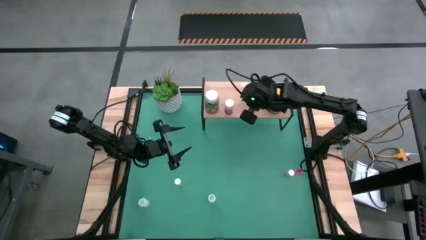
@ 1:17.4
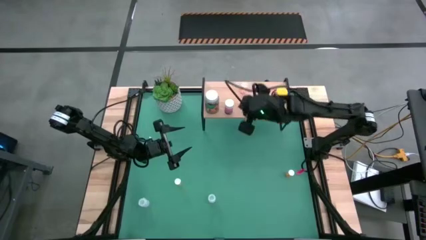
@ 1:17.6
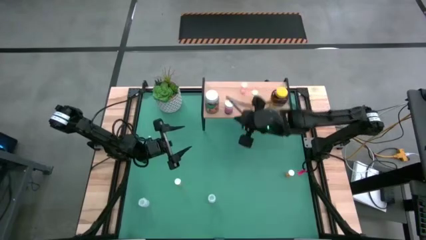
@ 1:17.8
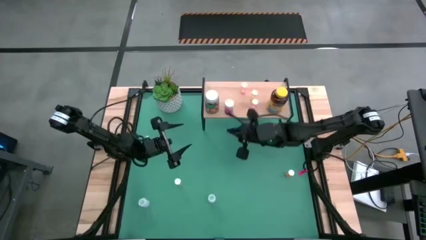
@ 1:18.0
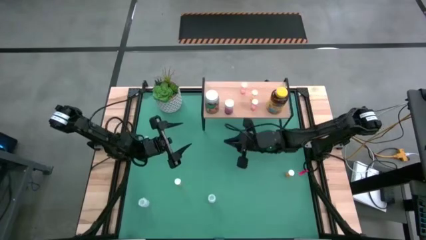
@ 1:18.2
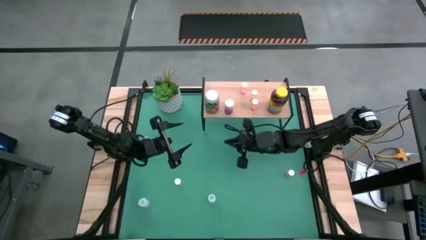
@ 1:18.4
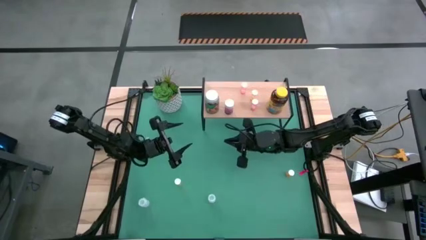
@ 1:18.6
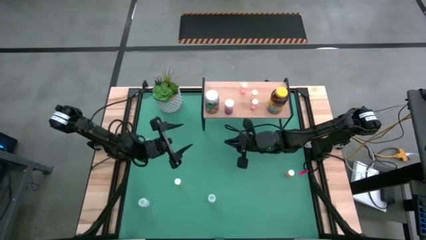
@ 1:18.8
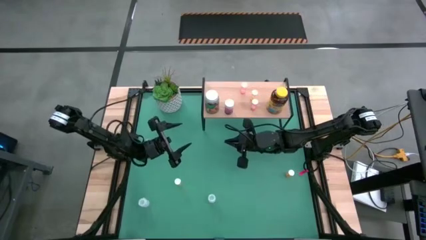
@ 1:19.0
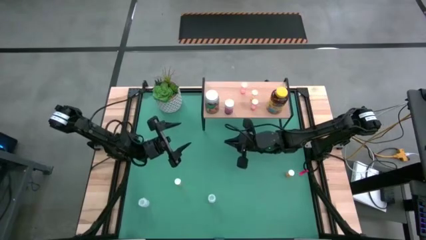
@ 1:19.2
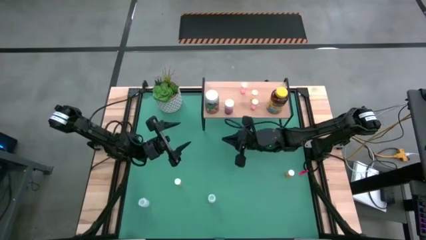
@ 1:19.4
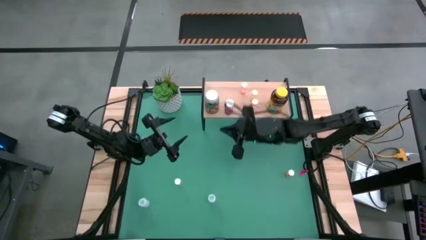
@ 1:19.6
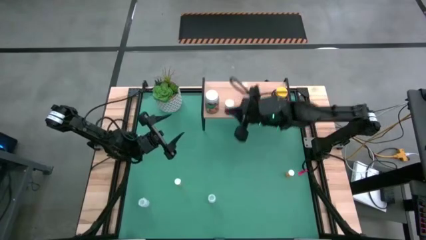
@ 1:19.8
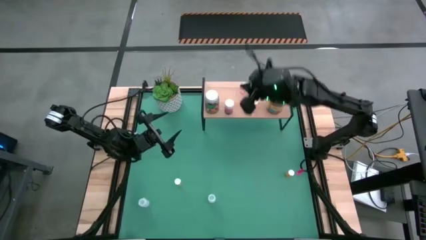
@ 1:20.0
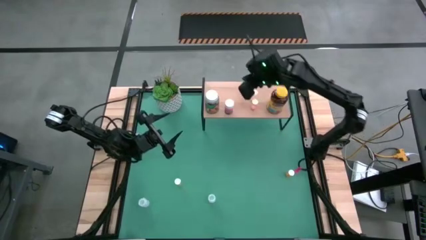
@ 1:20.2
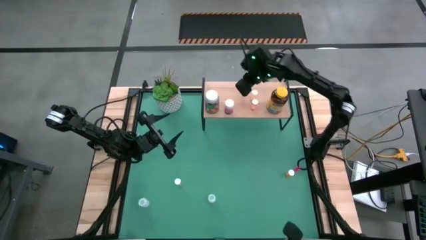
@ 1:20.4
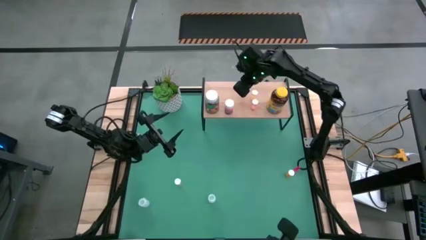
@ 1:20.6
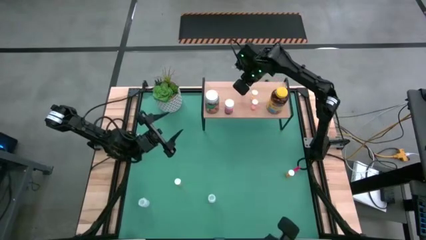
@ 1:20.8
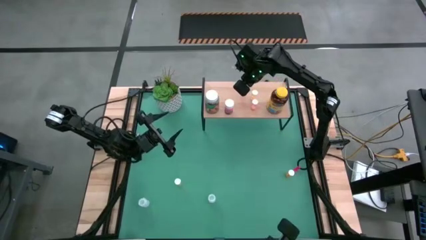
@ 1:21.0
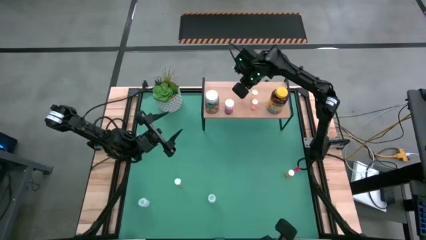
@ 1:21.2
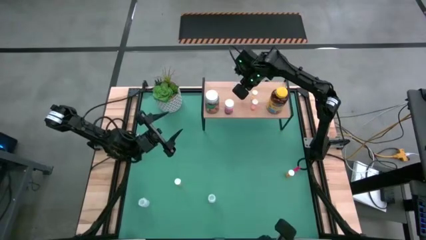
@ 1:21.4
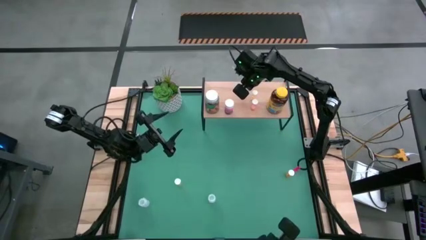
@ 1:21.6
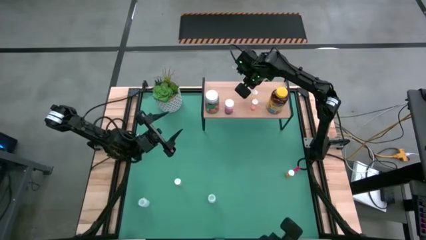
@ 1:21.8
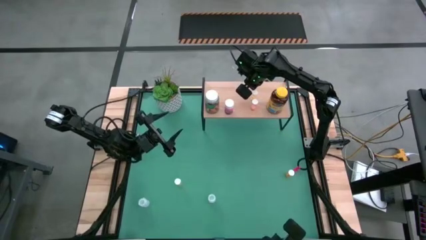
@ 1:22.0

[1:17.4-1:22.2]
Task: Pick and place medicine bottles onto shelf by color
Adjust the small pink medicine bottle on the shelf

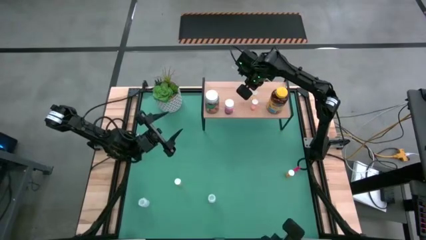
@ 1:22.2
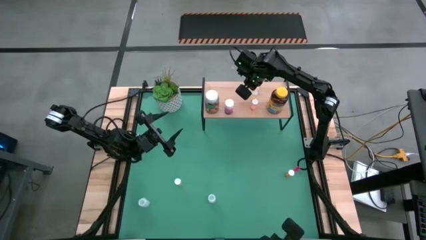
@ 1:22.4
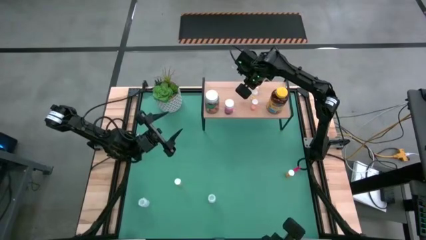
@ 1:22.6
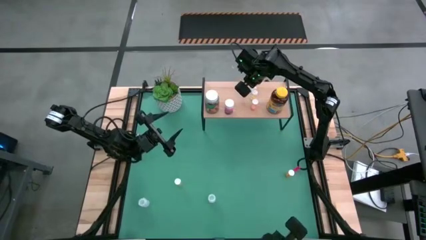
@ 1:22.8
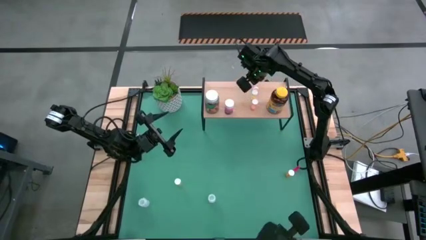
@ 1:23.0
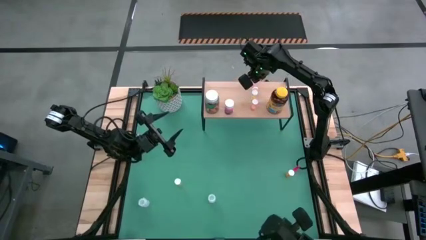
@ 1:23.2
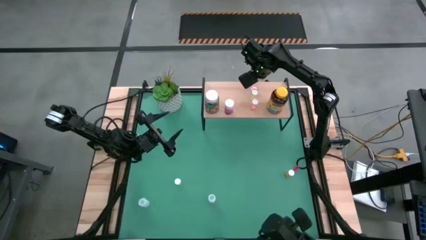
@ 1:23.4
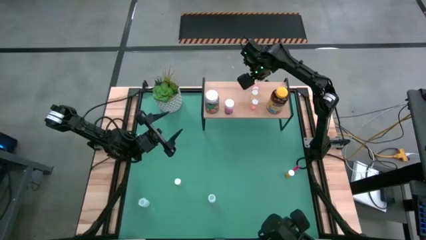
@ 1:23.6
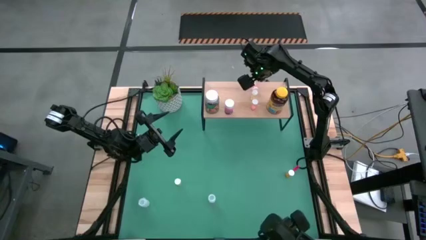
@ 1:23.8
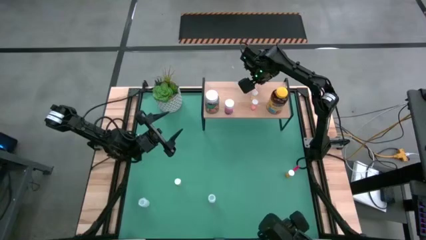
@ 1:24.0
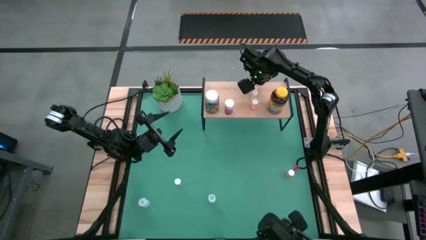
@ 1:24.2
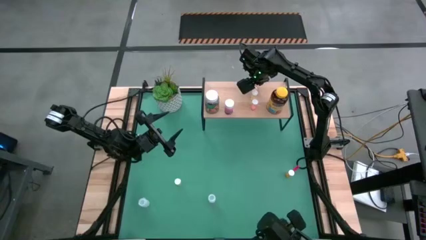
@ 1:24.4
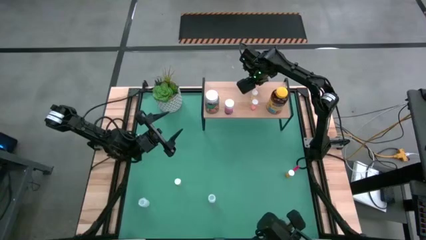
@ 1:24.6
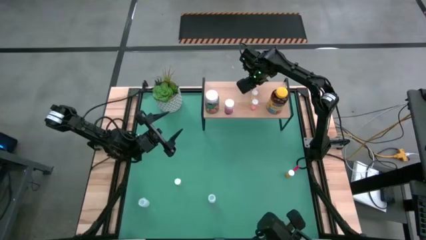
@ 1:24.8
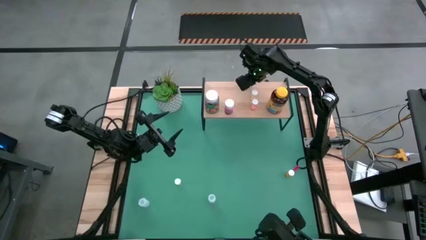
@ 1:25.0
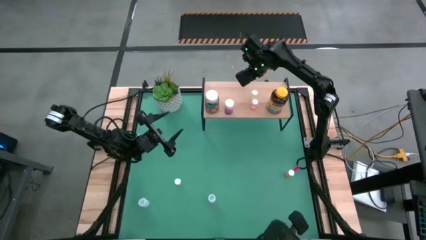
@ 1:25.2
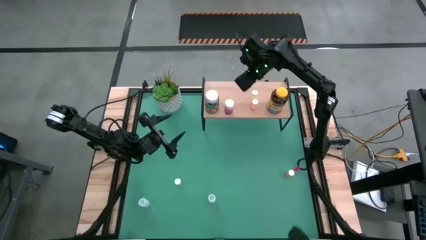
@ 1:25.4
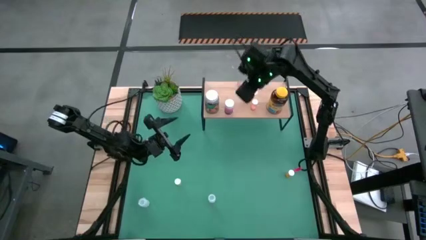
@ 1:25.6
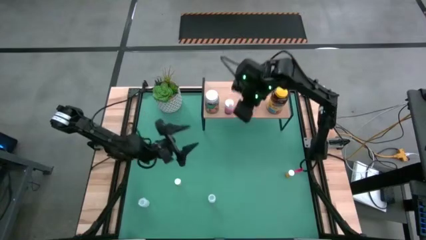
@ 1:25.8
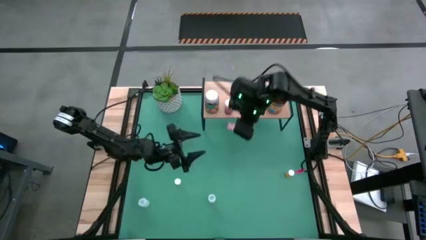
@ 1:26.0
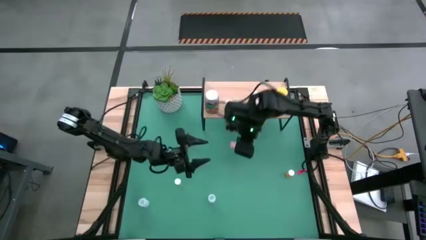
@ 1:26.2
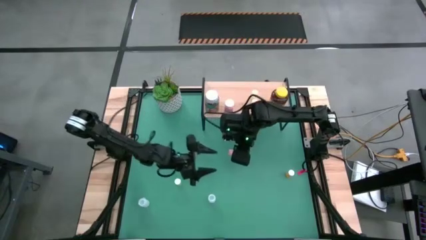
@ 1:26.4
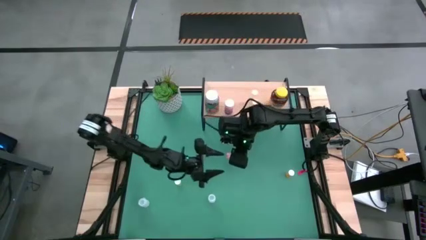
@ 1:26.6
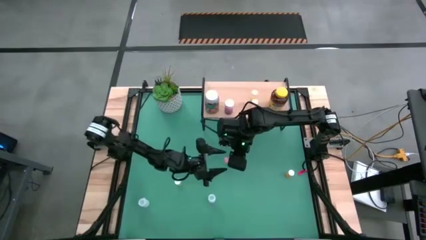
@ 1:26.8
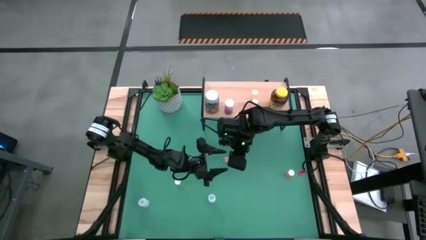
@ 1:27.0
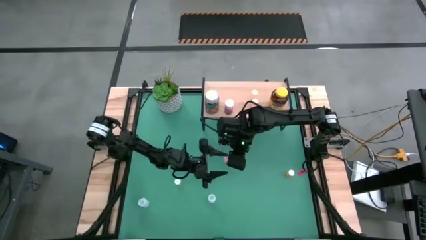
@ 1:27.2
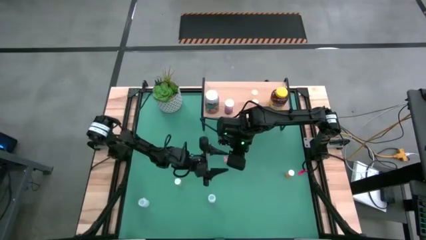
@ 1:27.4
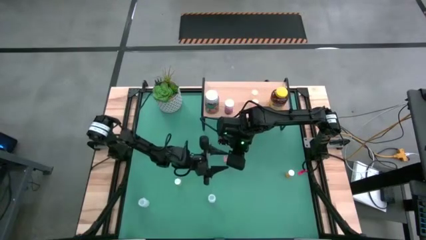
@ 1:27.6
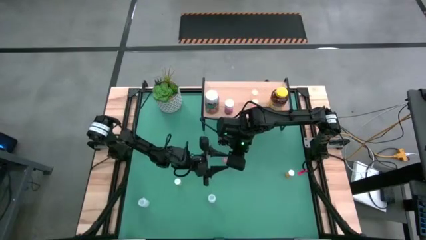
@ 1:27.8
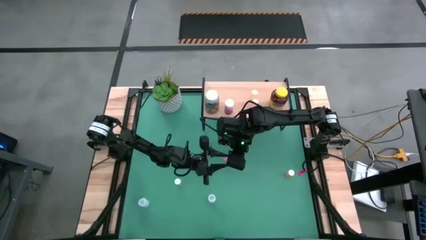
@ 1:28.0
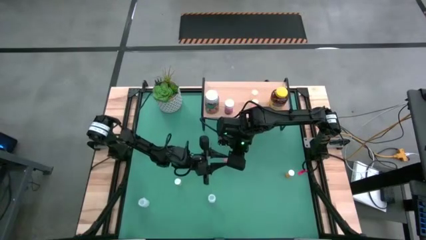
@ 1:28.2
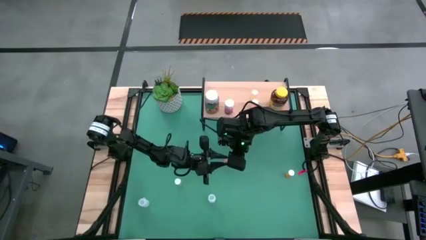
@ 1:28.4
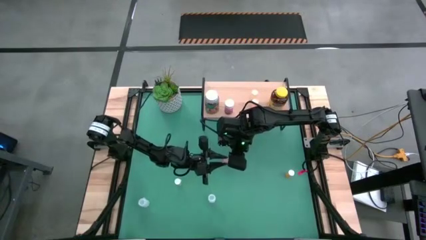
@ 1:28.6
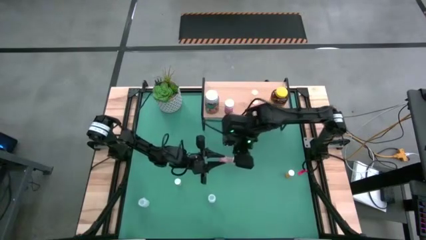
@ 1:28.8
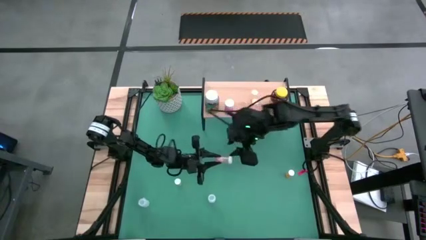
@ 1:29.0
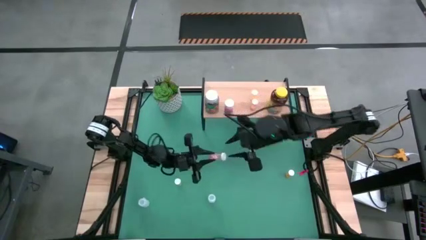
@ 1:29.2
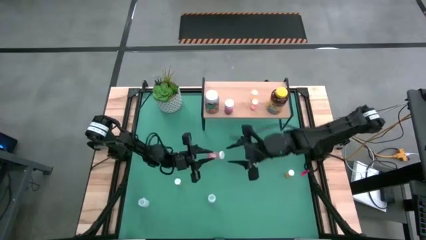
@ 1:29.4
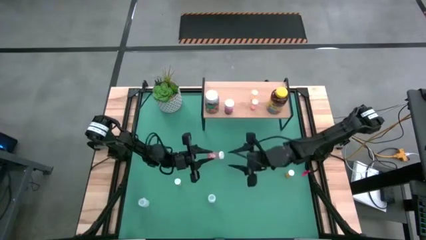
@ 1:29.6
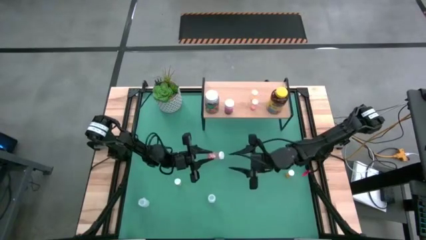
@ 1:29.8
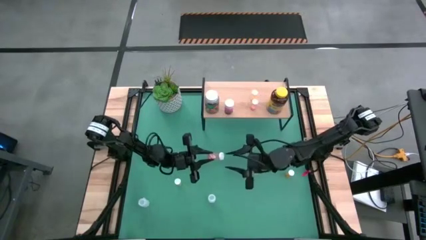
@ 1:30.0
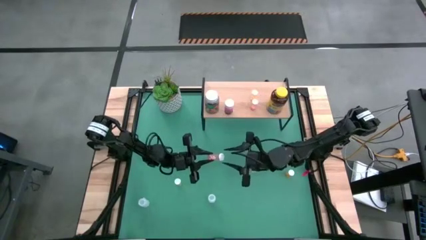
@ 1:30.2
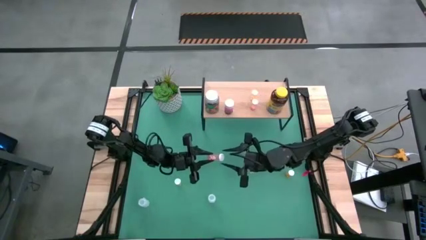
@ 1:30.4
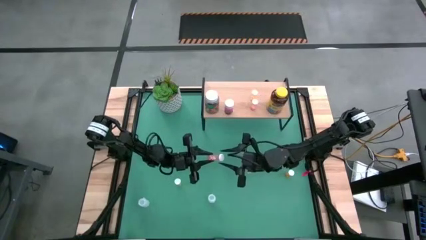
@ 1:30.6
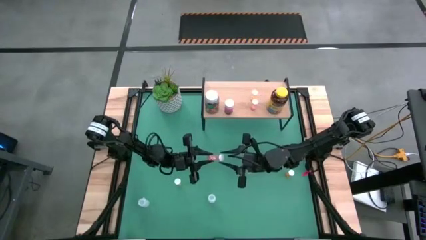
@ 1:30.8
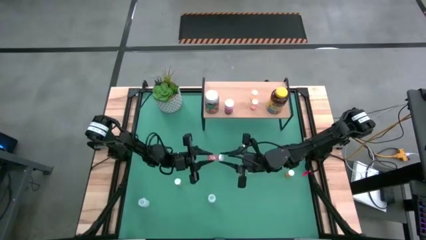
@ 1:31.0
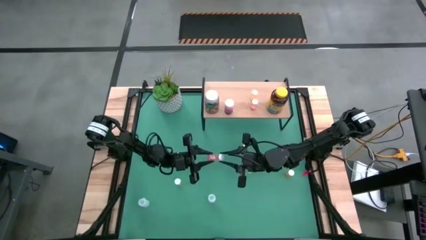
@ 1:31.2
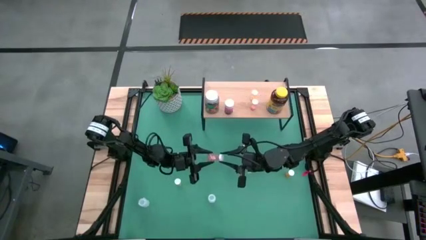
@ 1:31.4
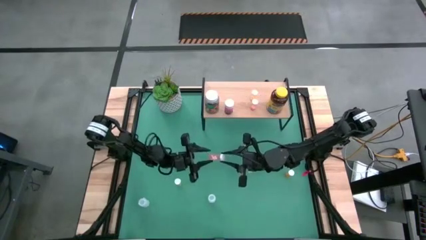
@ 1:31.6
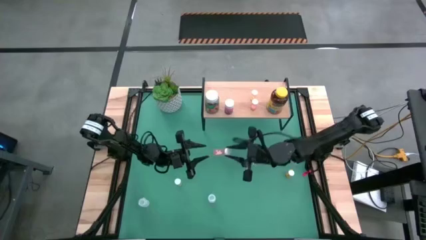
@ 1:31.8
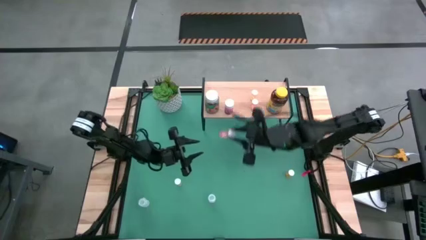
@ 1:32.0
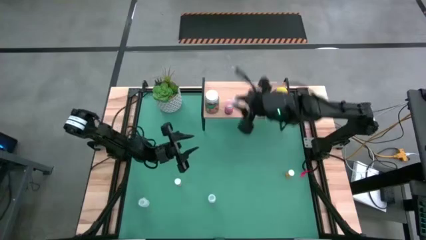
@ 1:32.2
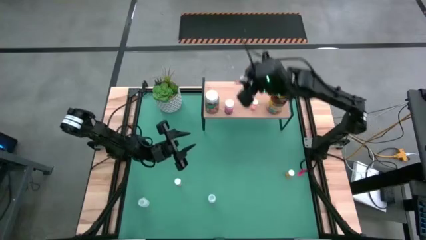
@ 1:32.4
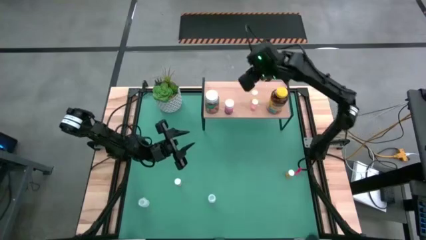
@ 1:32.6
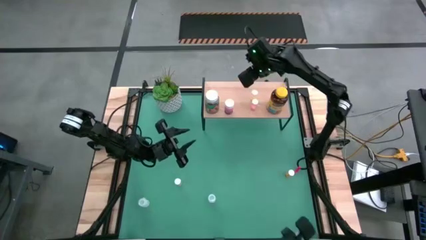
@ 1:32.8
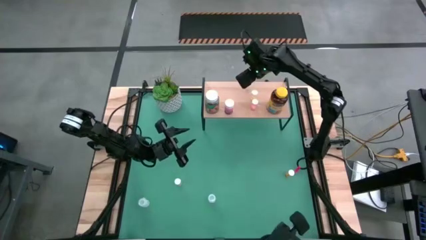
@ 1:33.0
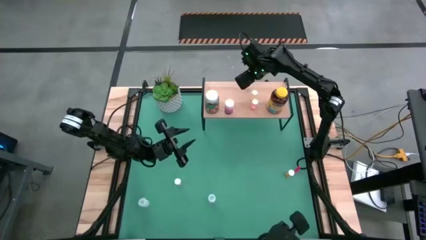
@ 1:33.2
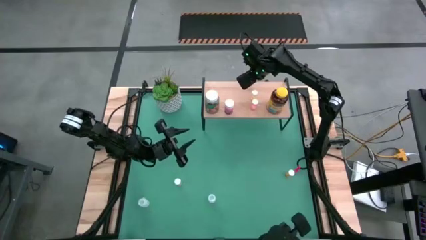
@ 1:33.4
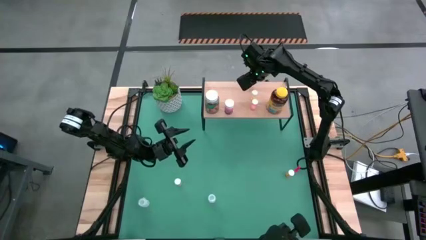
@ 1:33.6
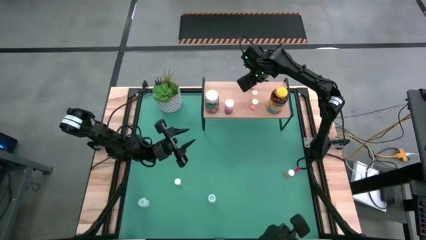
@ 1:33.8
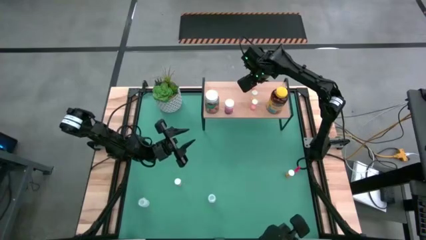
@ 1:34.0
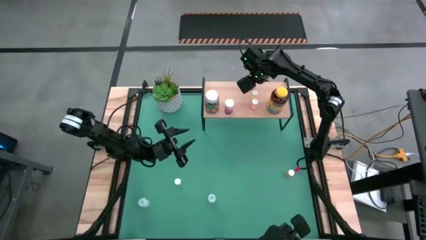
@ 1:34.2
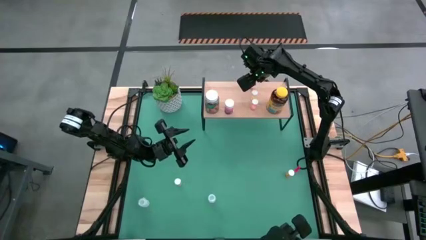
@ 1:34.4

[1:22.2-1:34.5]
Adjust the small pink medicine bottle on the shelf
